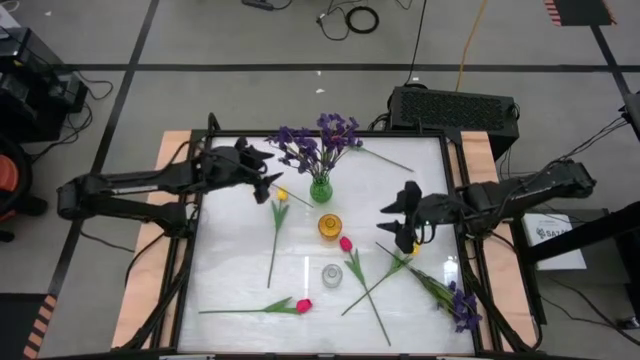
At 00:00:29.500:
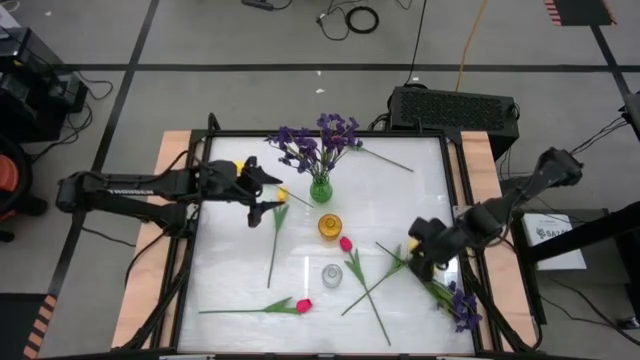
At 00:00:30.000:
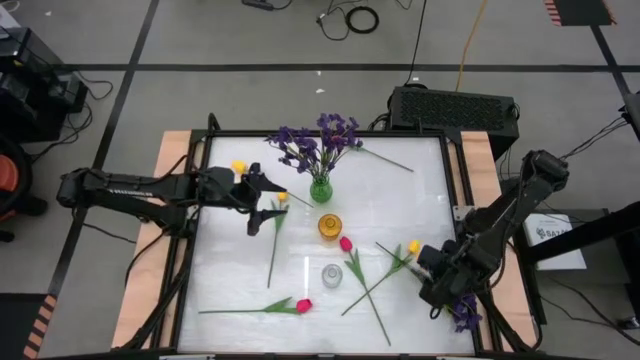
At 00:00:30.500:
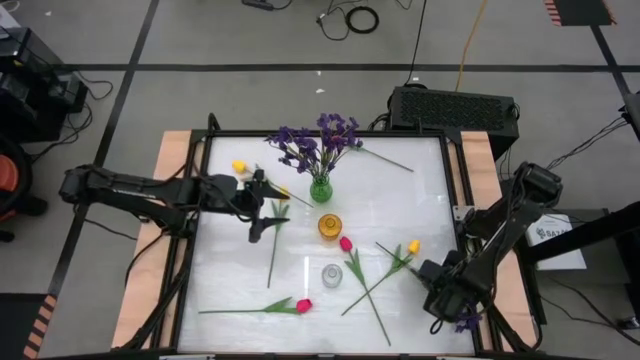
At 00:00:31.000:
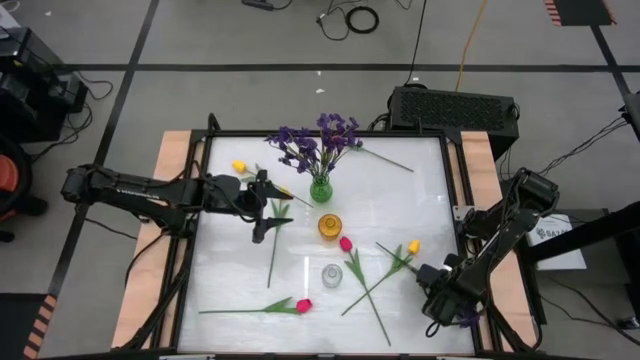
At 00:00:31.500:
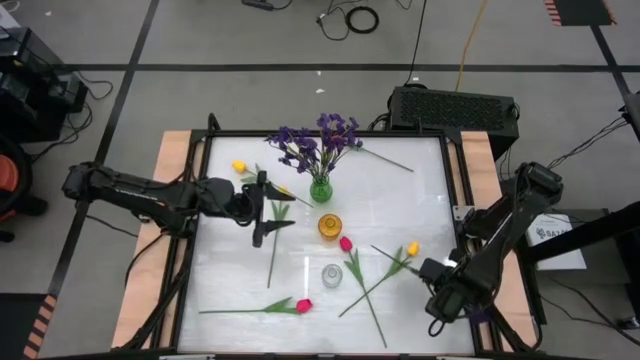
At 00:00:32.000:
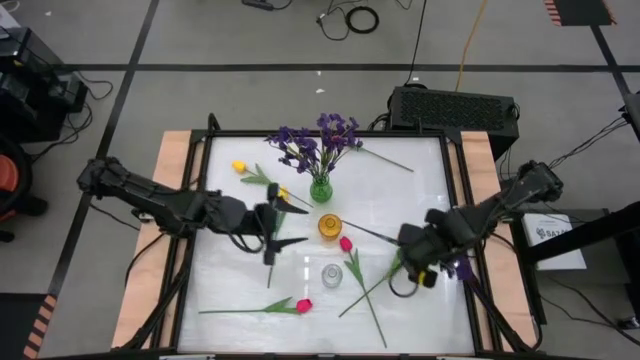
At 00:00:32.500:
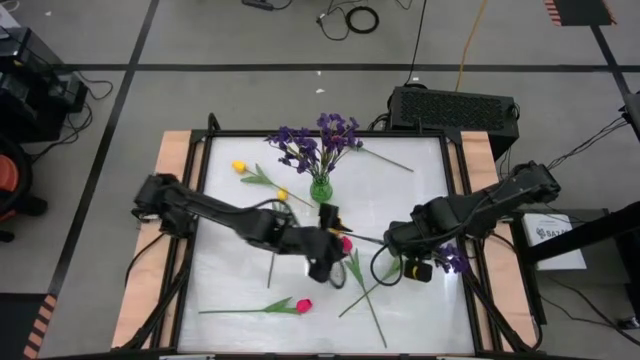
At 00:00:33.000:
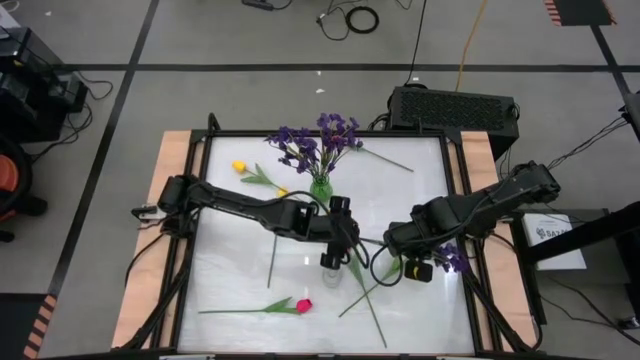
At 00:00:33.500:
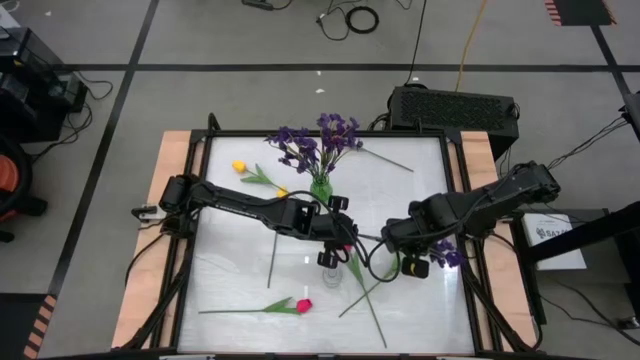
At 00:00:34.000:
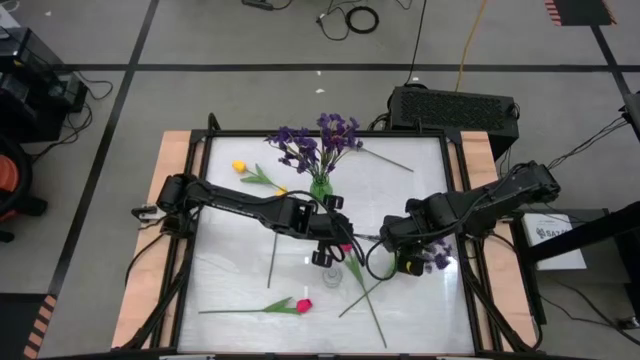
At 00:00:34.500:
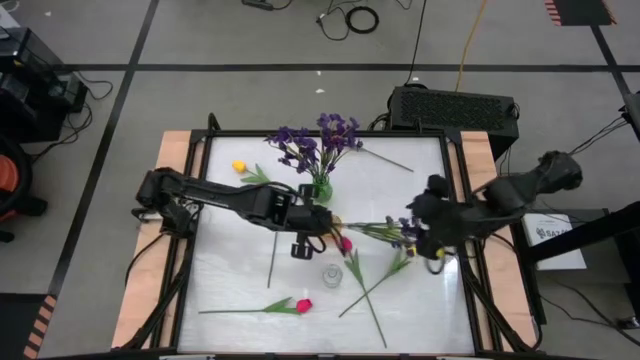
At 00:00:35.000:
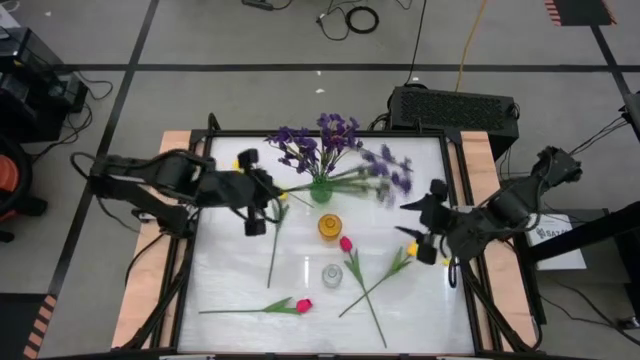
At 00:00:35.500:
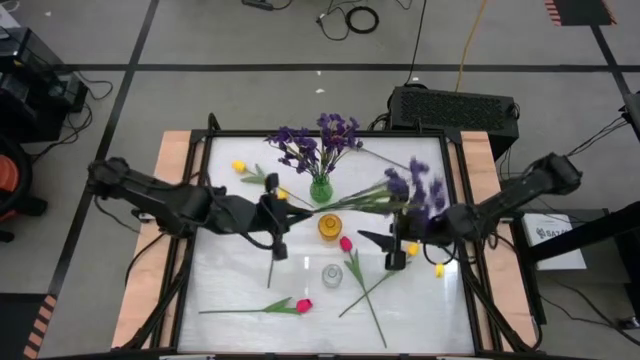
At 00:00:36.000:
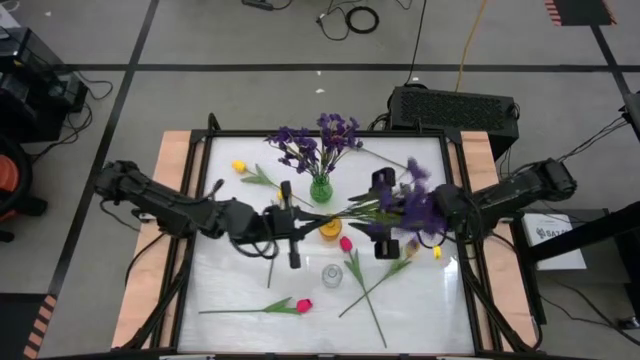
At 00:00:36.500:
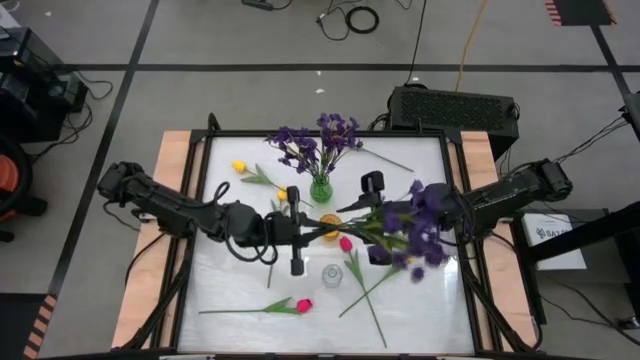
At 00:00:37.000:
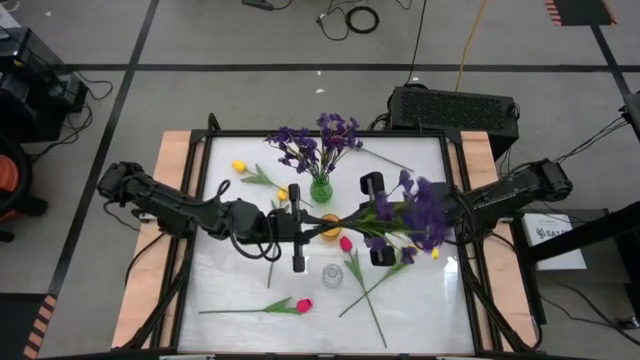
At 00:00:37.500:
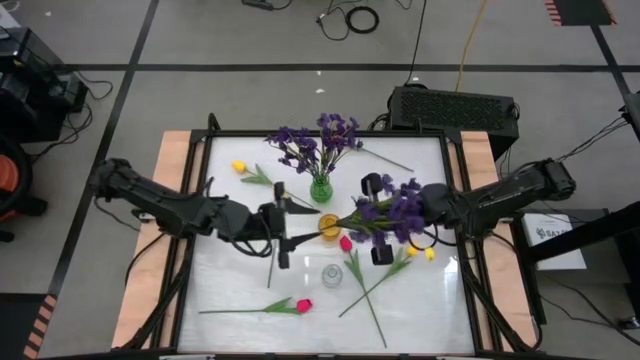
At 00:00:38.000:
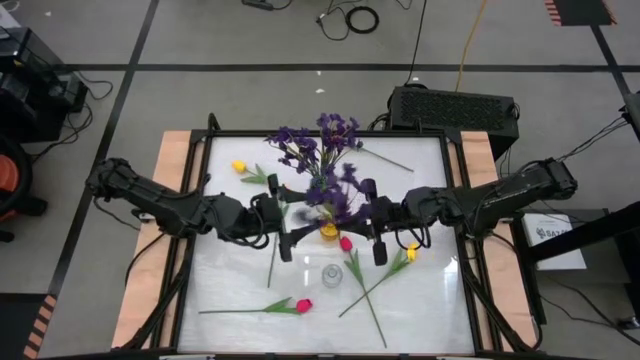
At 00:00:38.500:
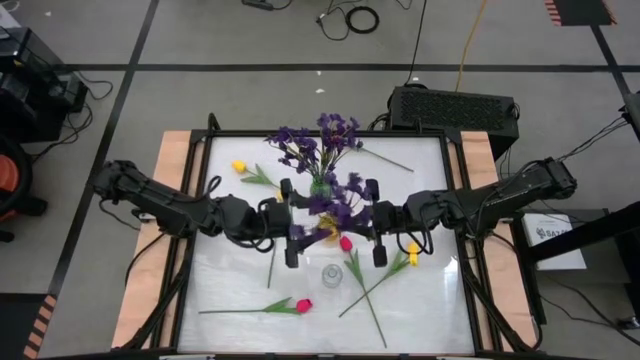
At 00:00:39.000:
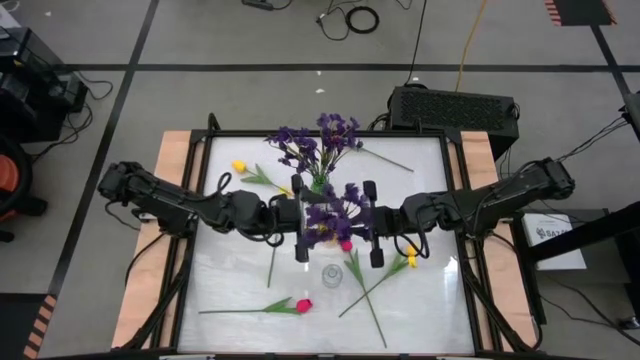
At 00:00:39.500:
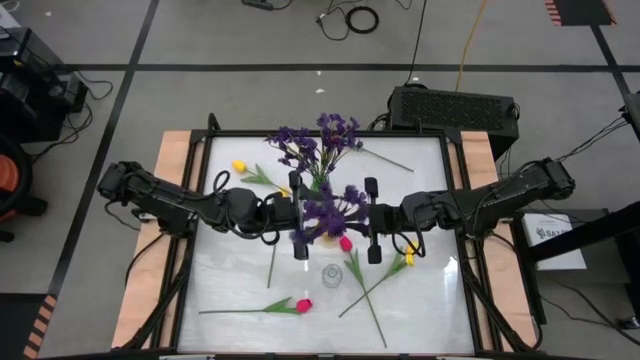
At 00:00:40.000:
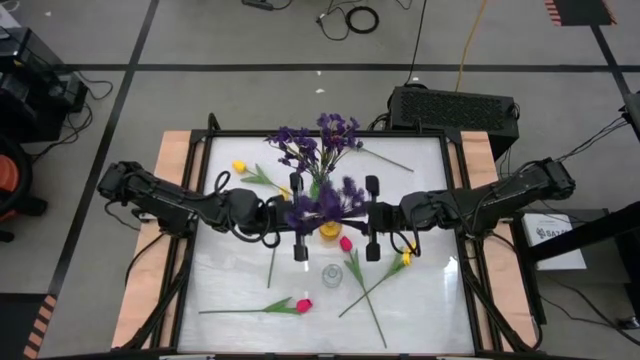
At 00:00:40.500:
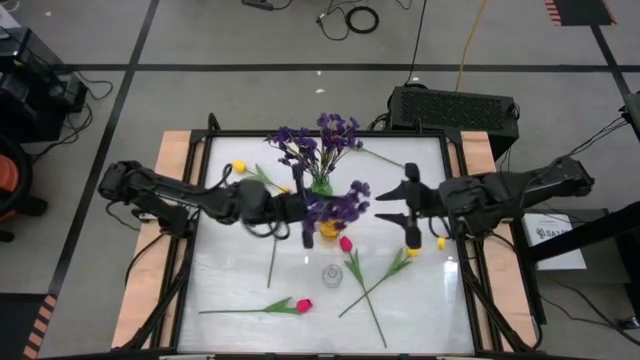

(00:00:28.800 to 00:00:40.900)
Task: Sort flowers into vase by color
Put the purple flowers into the green vase

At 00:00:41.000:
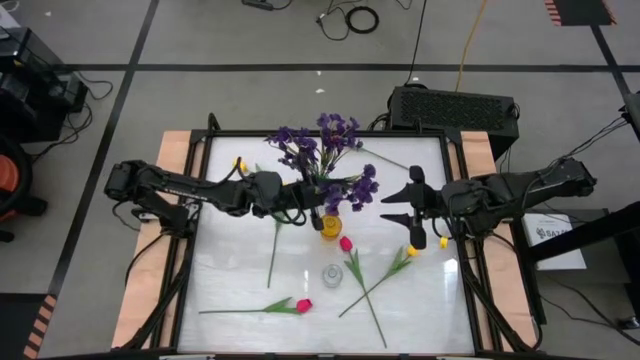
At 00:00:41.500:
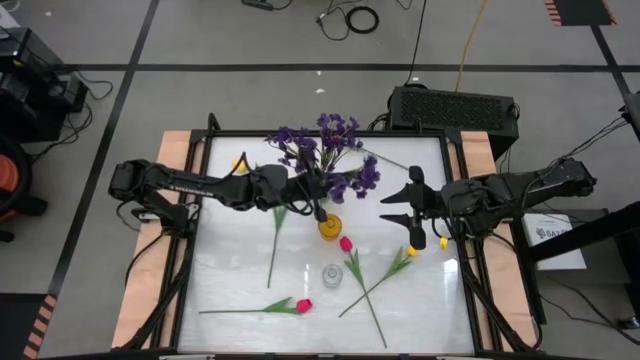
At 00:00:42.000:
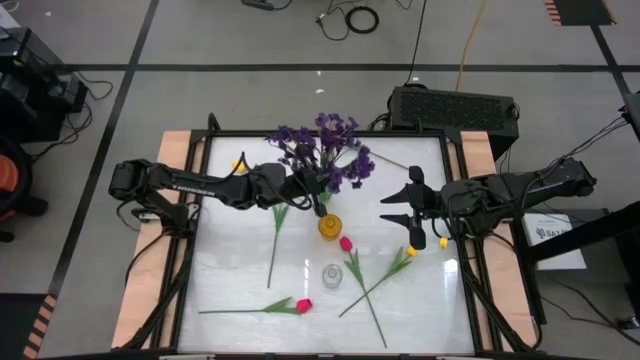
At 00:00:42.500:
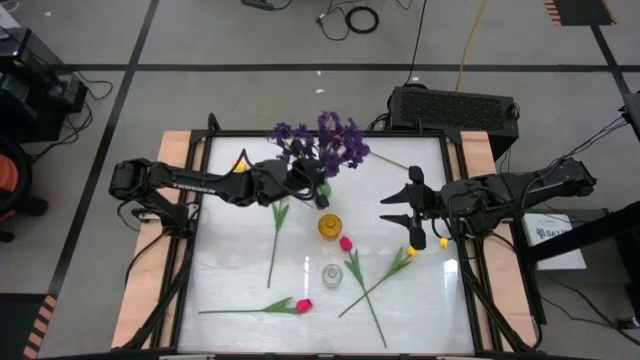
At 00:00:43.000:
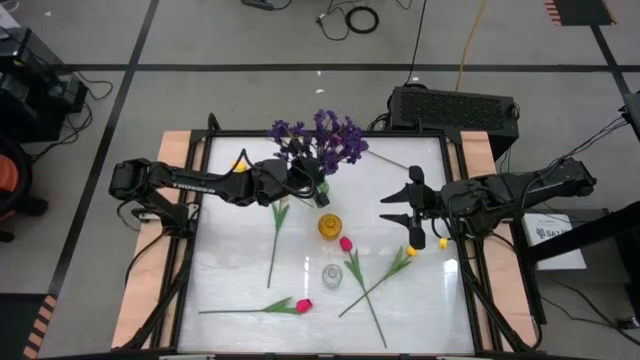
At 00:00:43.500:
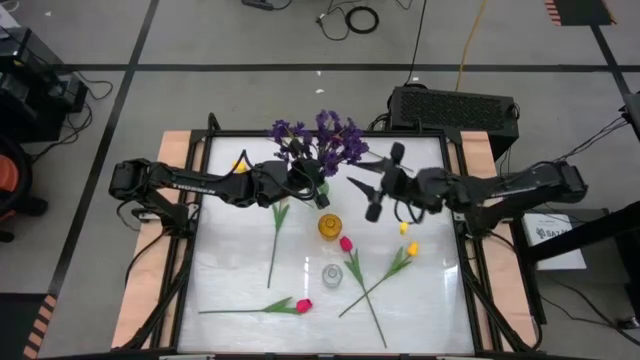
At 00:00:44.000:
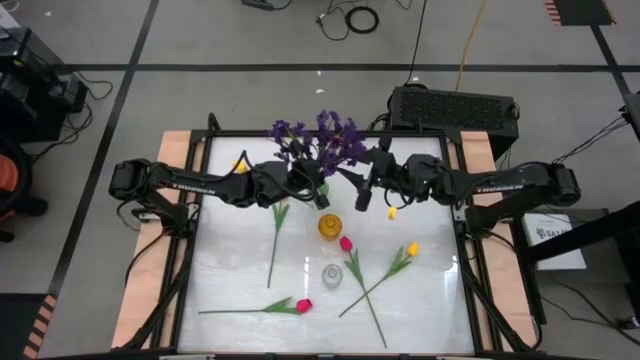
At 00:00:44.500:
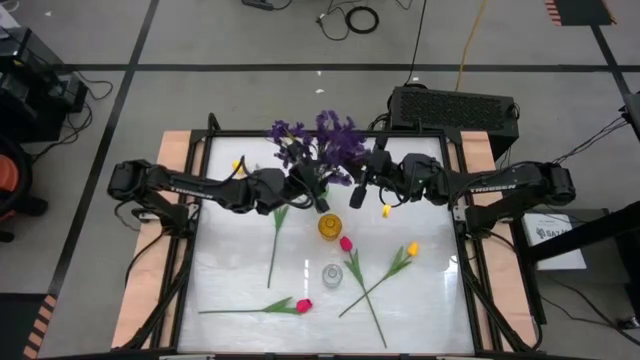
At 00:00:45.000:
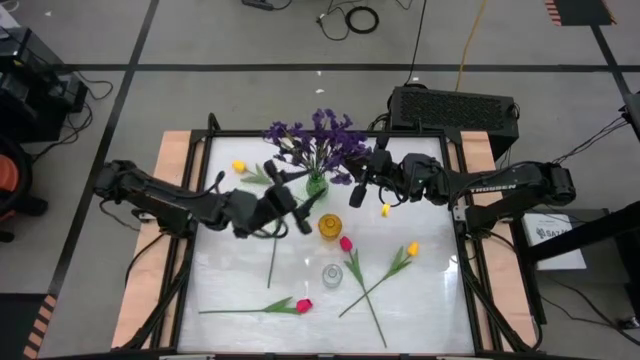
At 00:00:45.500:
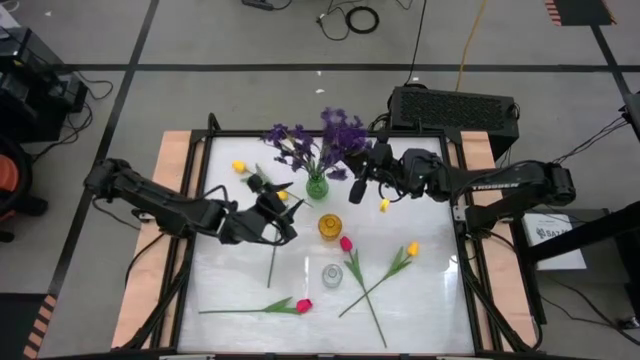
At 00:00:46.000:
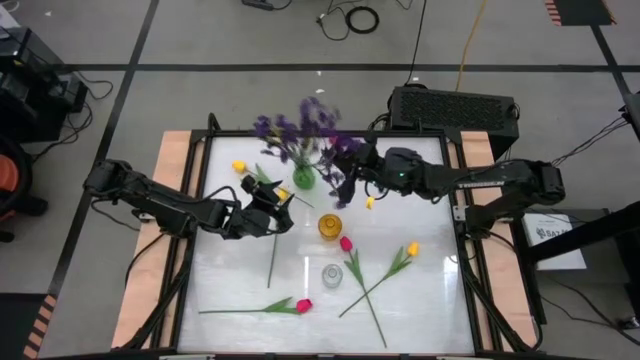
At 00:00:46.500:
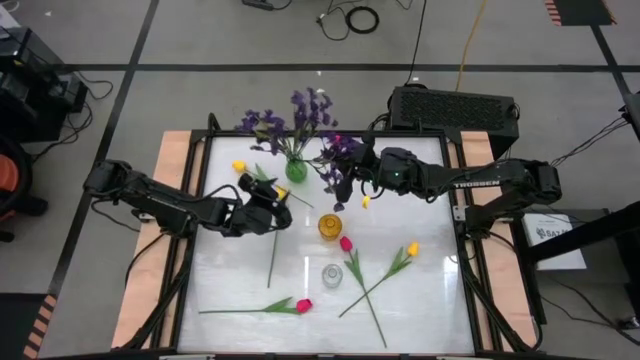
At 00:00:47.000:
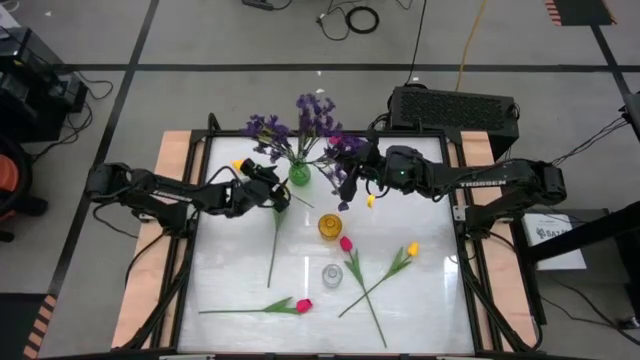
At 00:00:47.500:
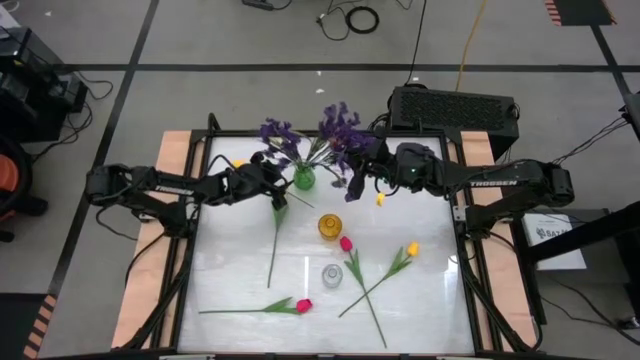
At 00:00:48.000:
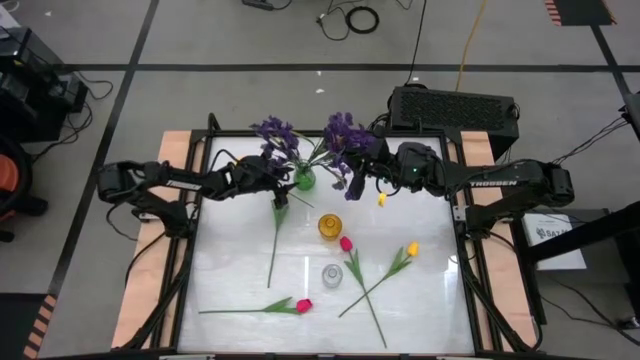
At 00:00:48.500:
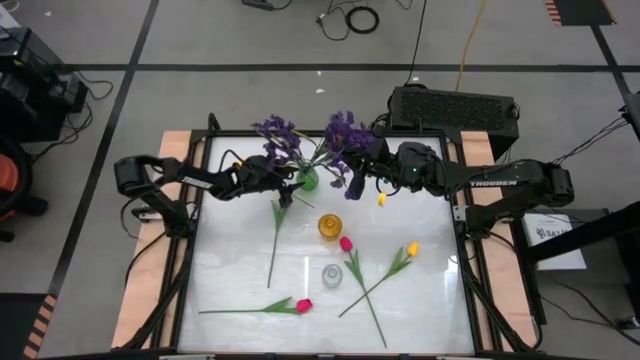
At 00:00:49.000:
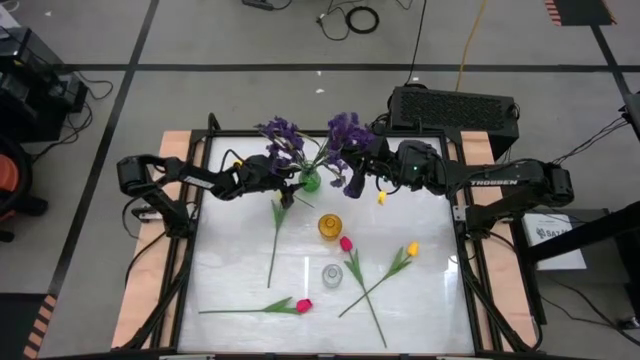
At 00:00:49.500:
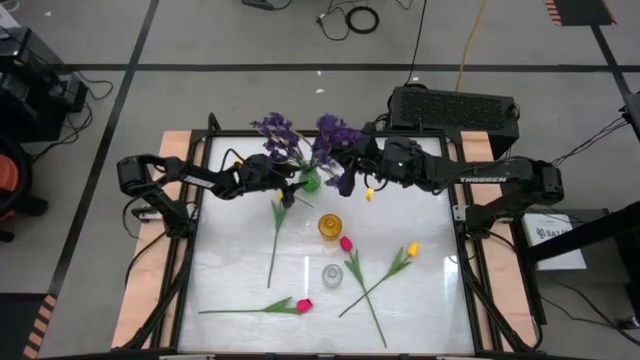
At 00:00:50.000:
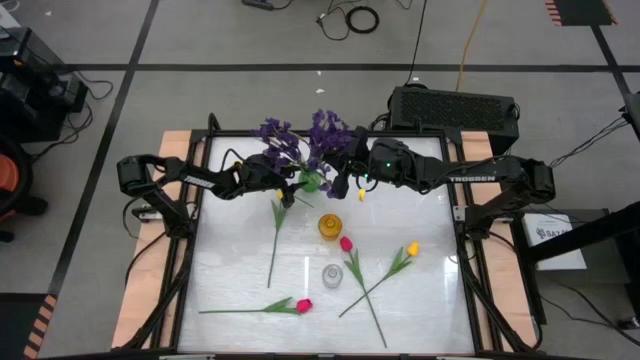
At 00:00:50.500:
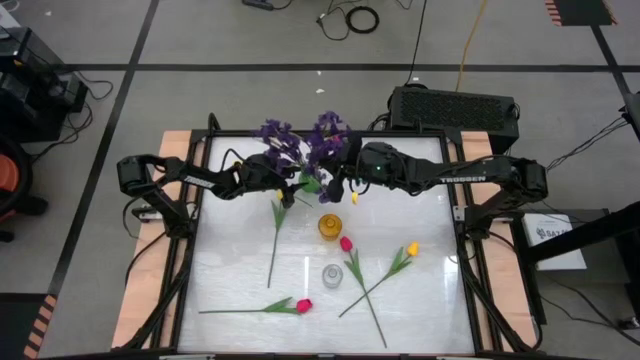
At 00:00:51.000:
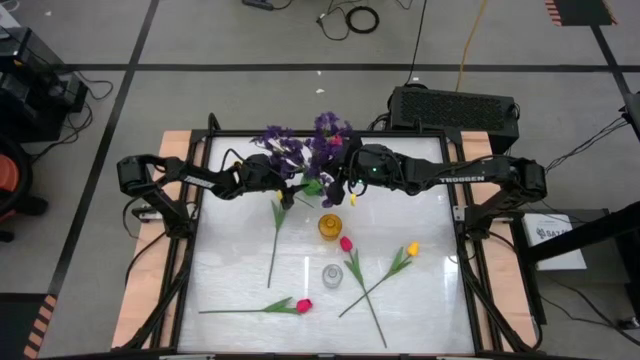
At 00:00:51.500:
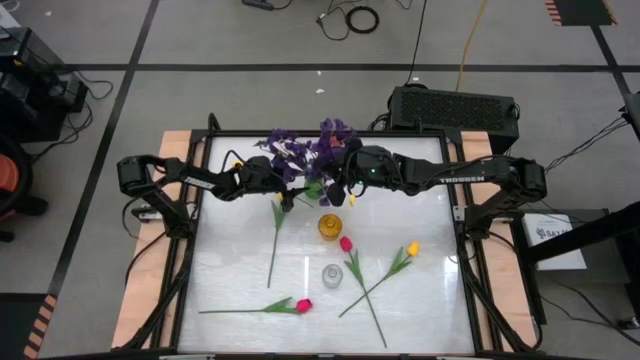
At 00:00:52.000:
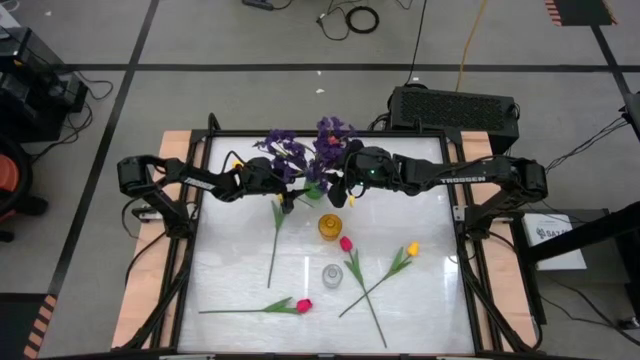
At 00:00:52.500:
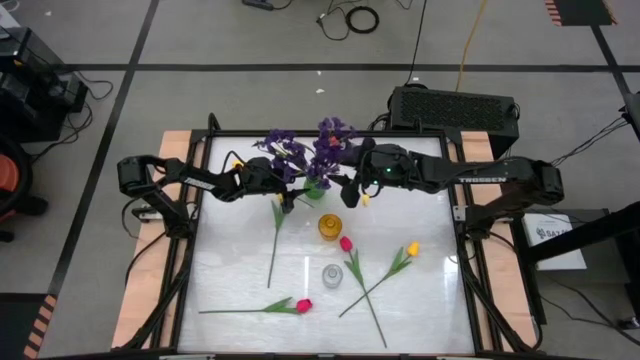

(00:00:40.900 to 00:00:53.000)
Put the purple flowers into the green vase
